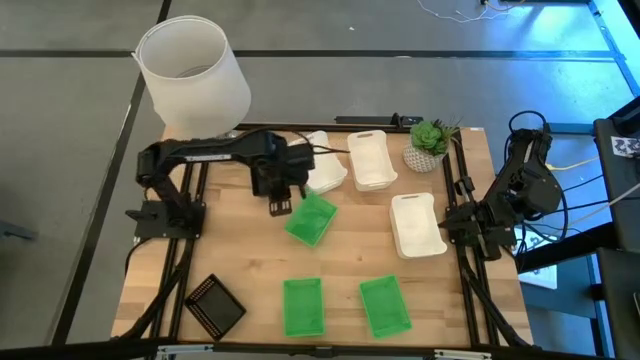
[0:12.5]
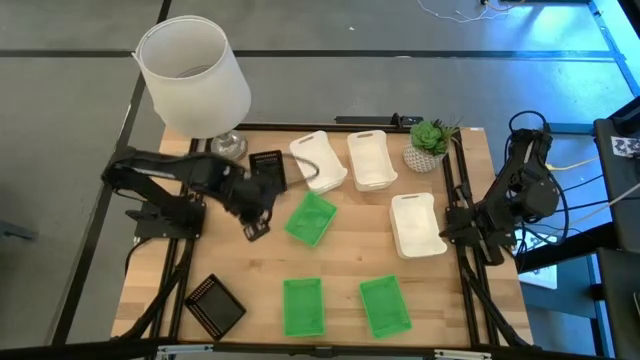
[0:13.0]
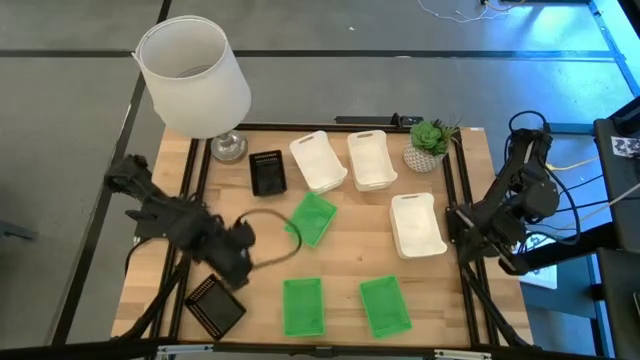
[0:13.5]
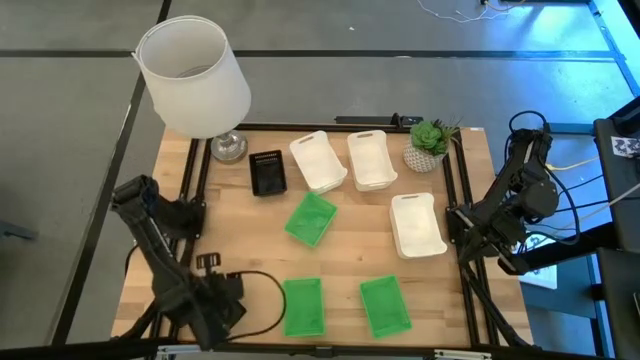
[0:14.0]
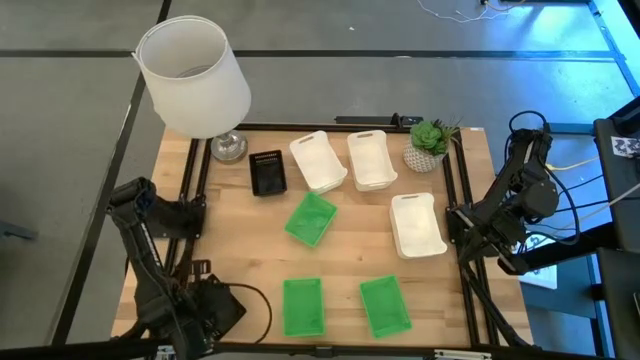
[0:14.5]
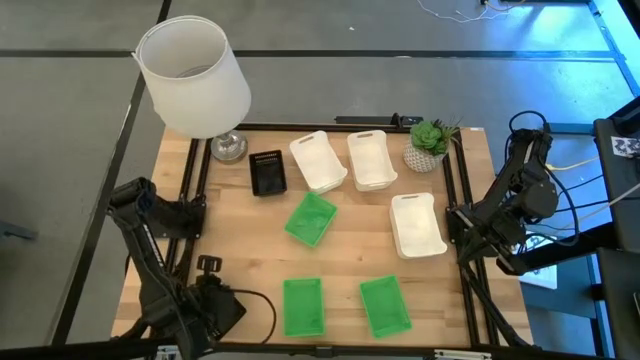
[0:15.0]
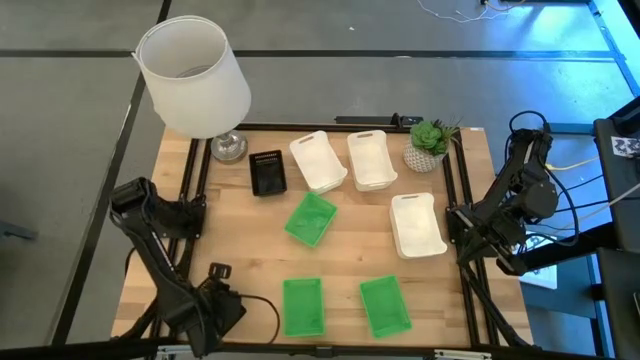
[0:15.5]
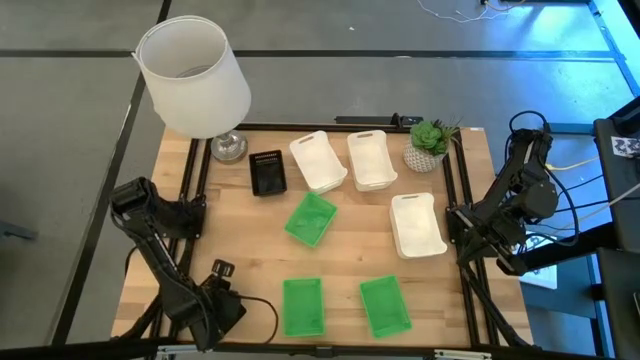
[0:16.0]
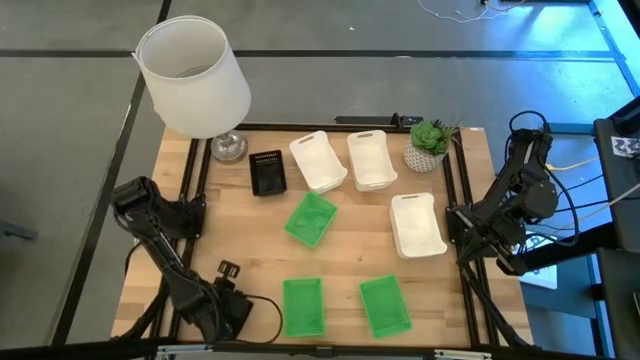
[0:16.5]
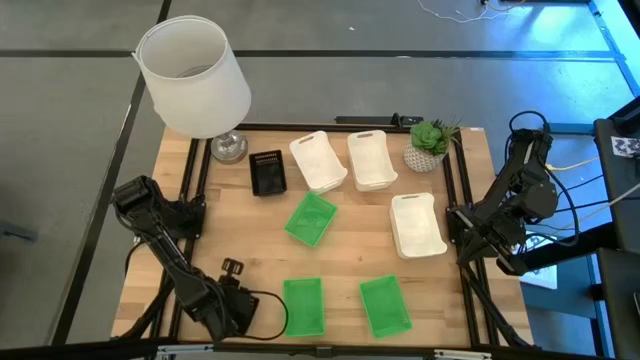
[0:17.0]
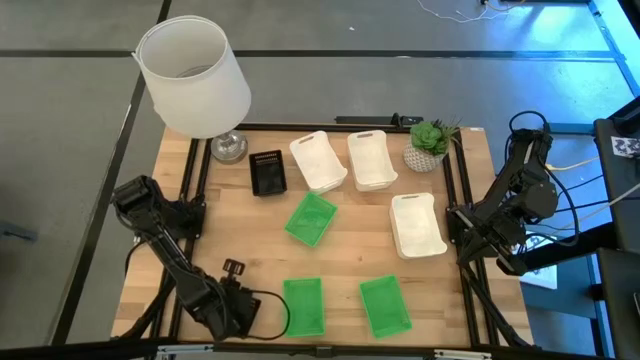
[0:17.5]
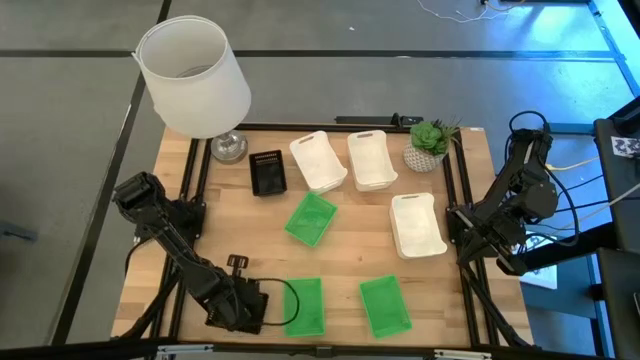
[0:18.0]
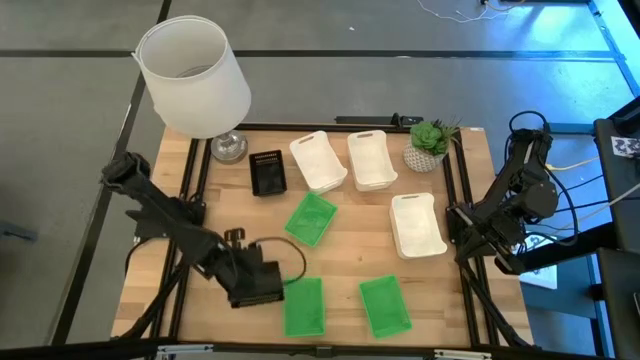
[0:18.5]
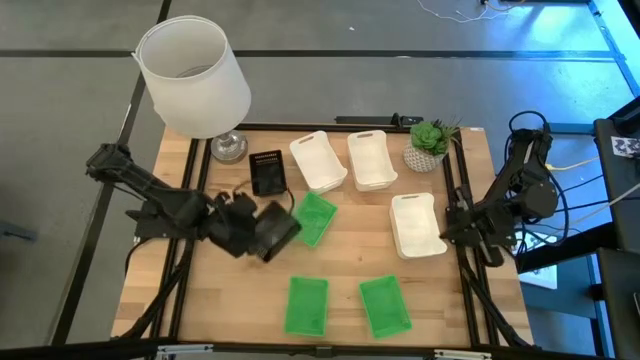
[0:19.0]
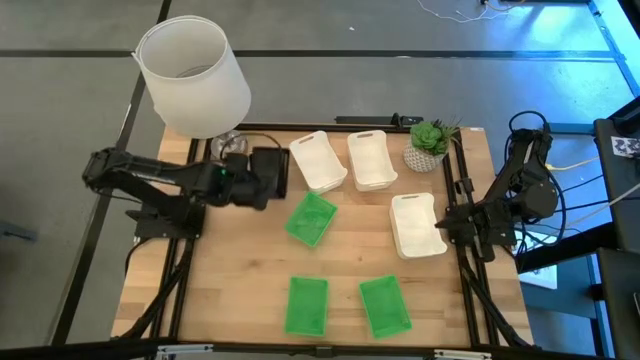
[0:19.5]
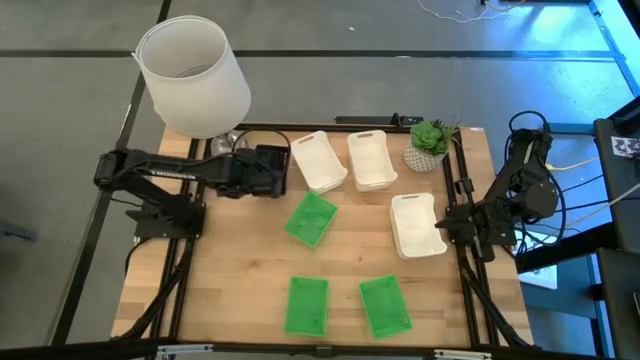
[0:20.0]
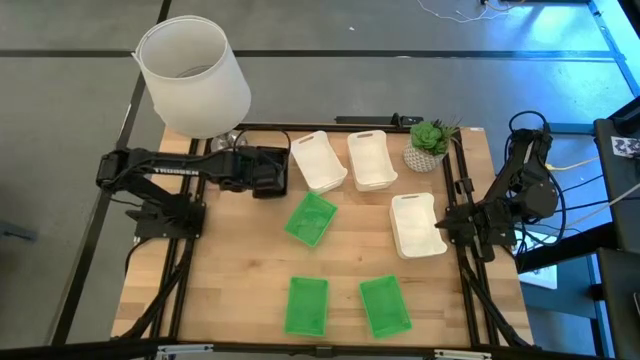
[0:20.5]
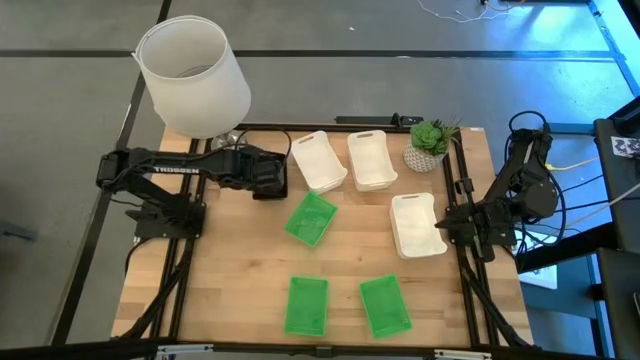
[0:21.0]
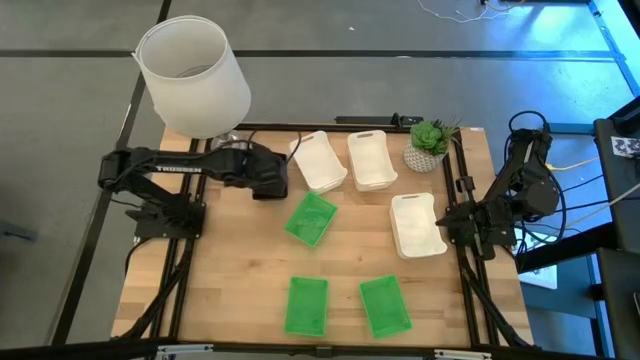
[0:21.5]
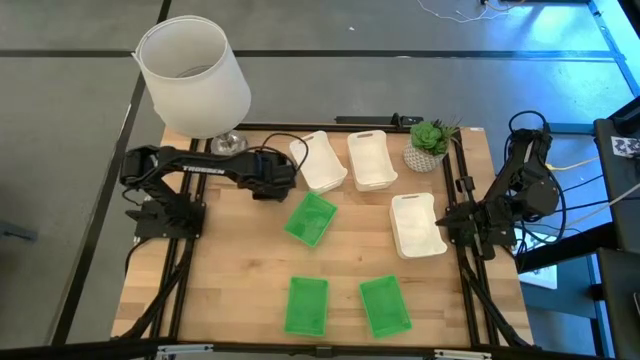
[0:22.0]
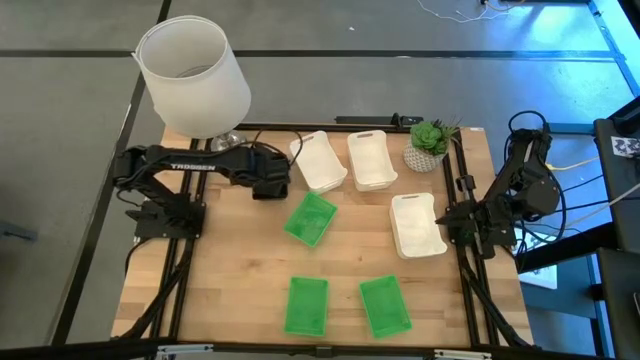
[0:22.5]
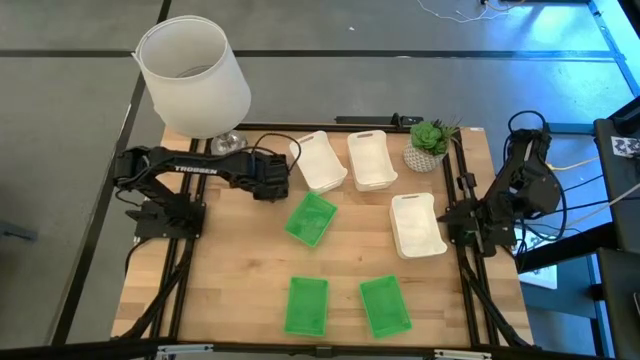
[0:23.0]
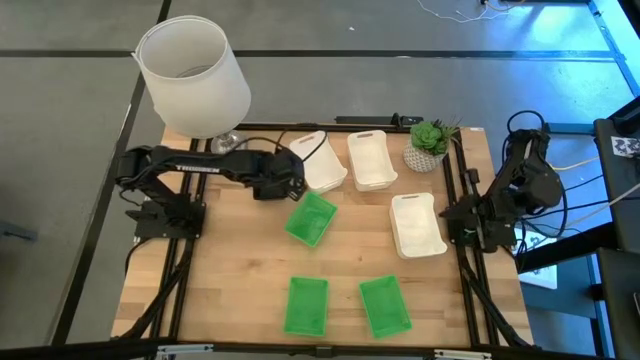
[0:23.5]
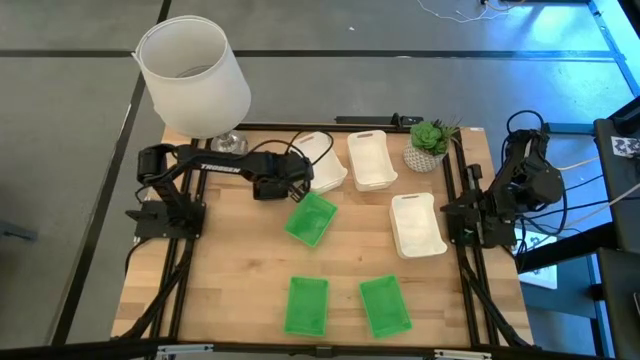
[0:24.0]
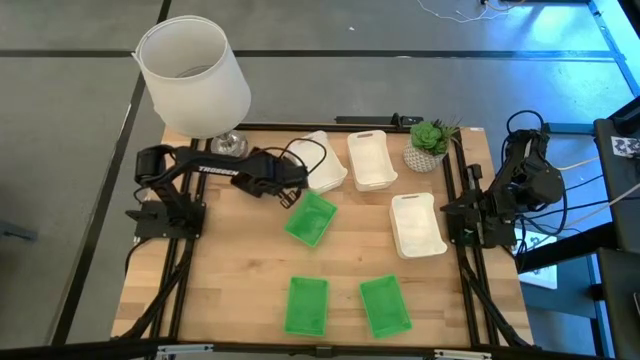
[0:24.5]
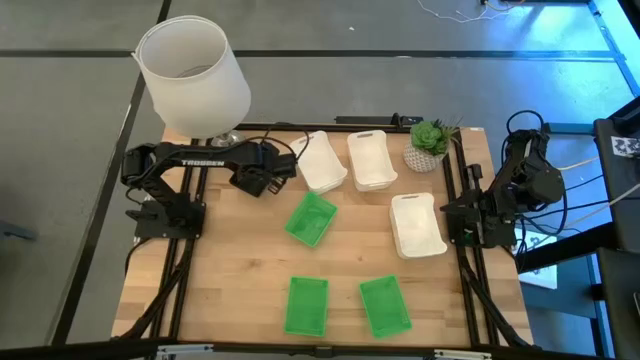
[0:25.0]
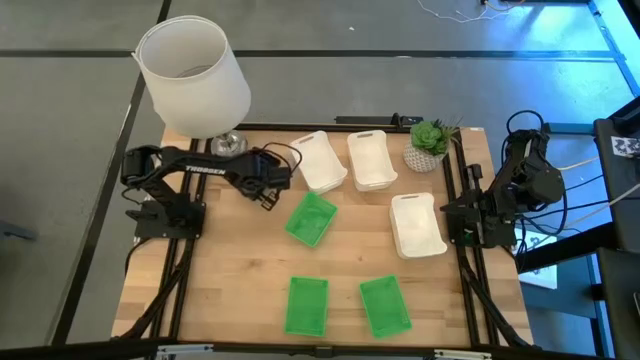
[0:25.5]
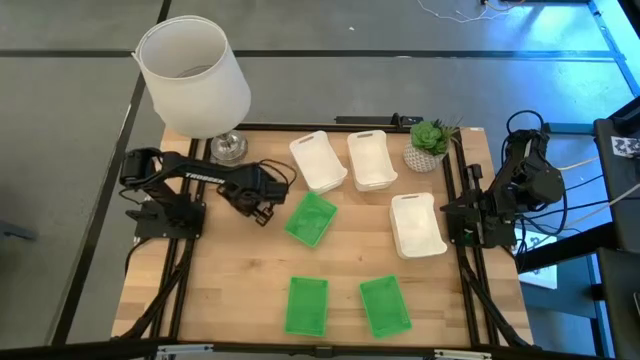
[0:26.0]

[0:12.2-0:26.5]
Stack the bottom black bin on the other black bins

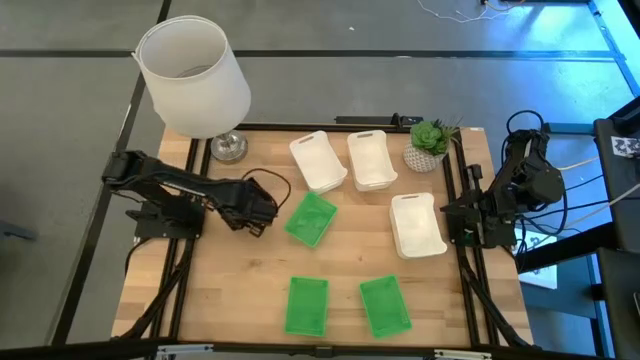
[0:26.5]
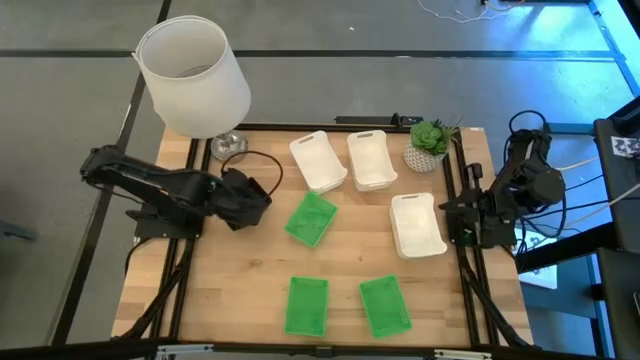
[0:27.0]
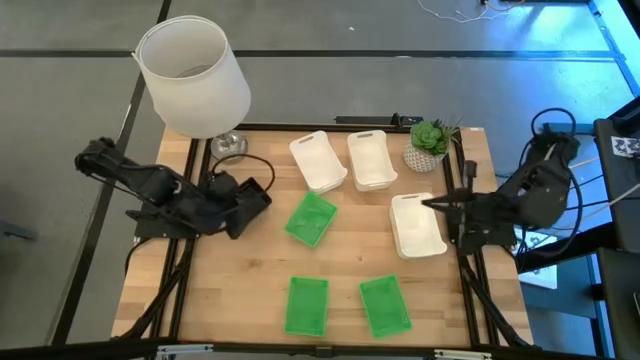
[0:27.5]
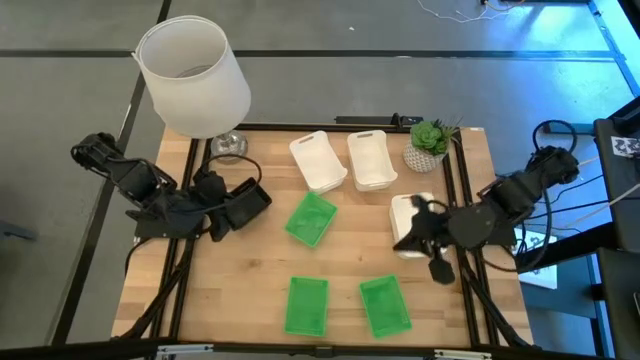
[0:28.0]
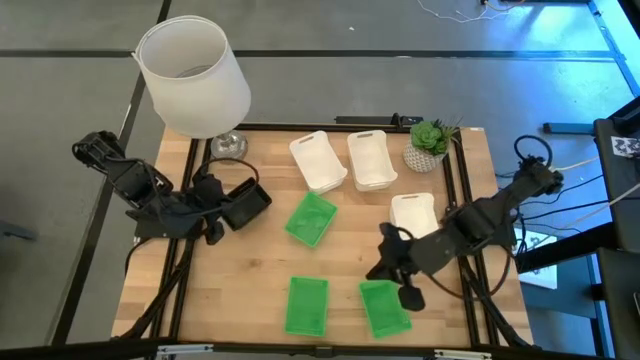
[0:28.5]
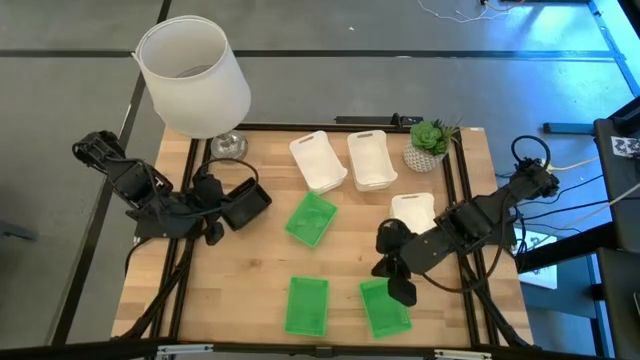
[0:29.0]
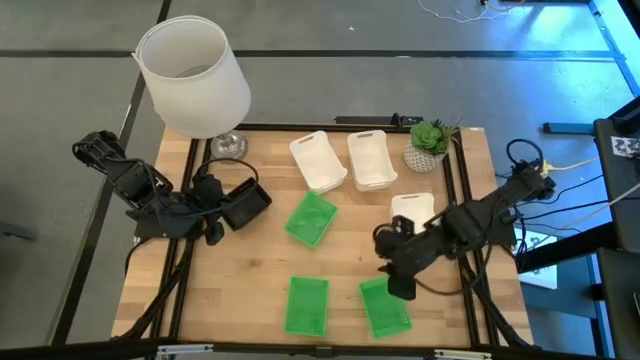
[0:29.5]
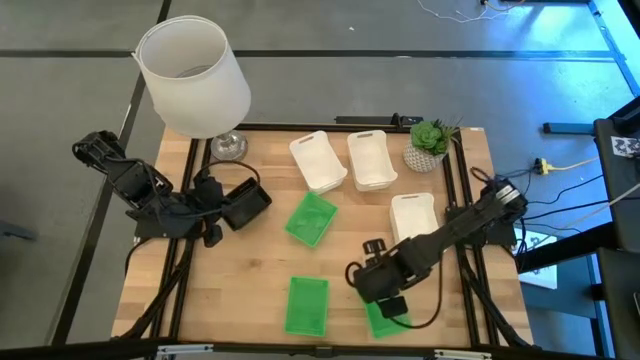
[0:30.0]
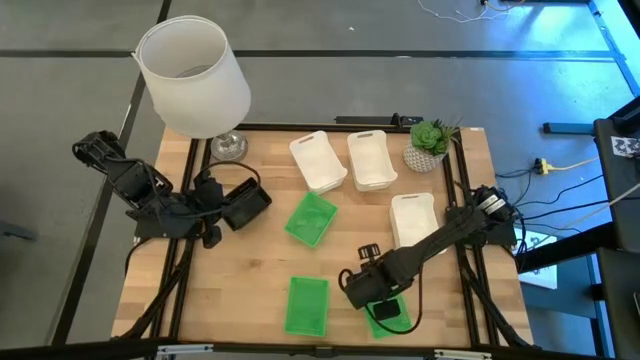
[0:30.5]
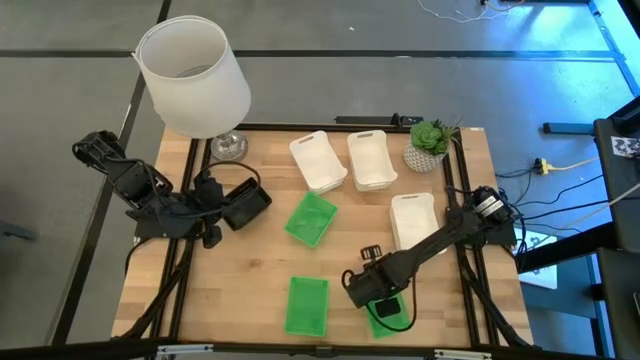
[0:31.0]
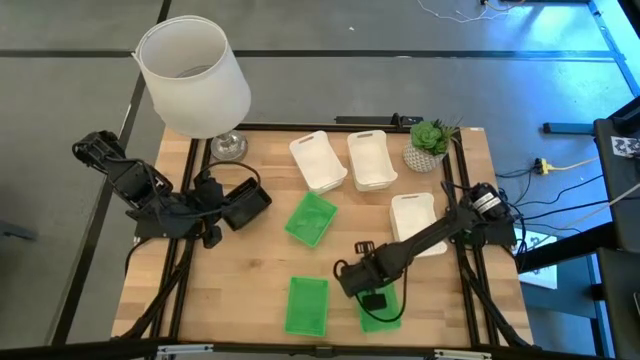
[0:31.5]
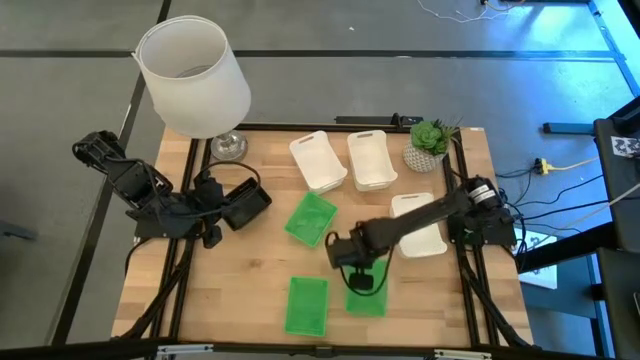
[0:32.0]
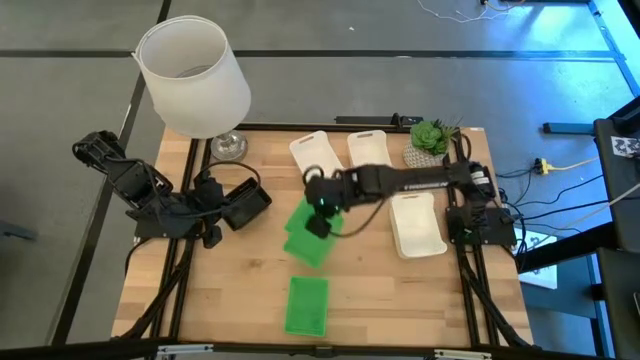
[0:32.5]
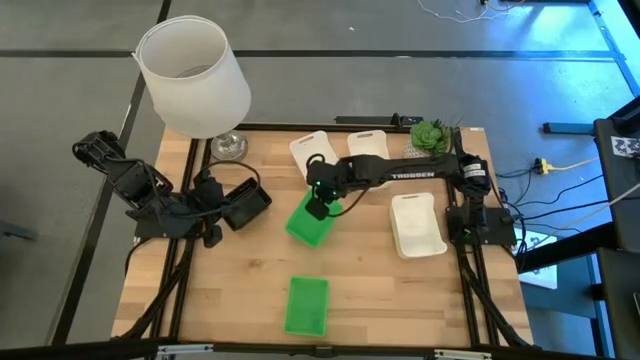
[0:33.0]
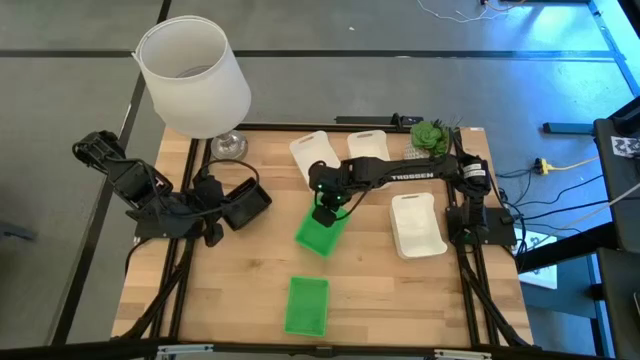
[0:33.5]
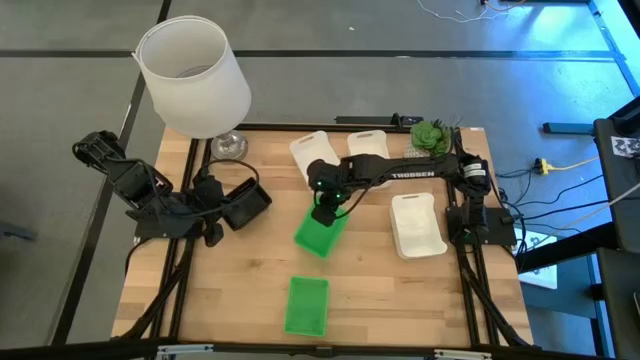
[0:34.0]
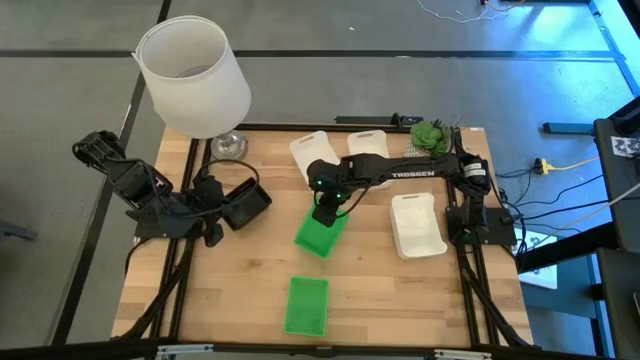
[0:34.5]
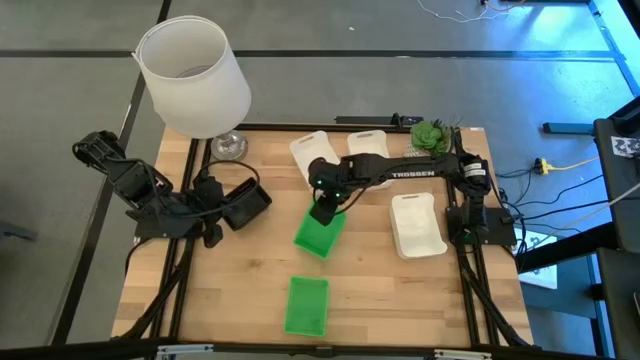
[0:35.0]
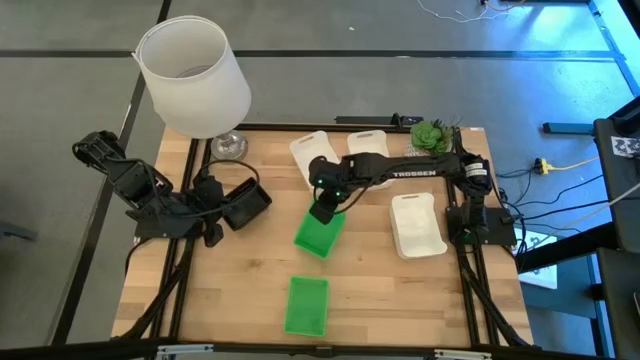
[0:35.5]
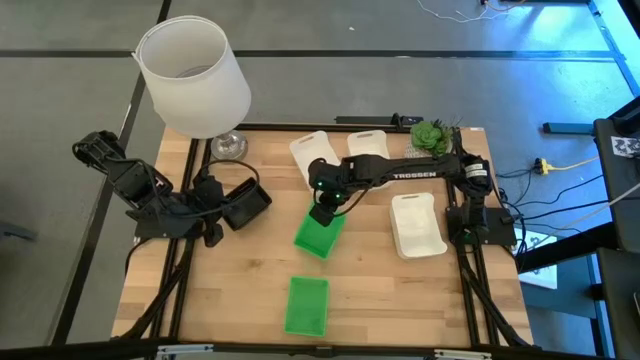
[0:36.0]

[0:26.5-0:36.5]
Stack the right green bin on the top green bin
